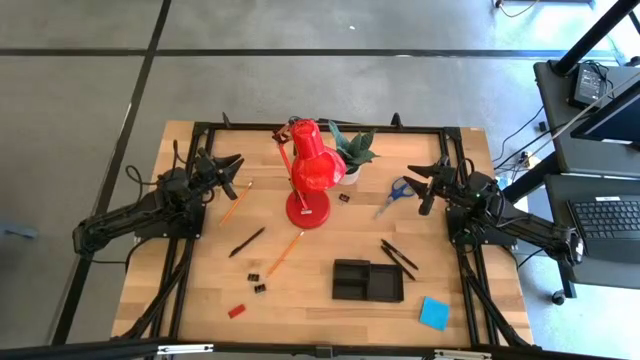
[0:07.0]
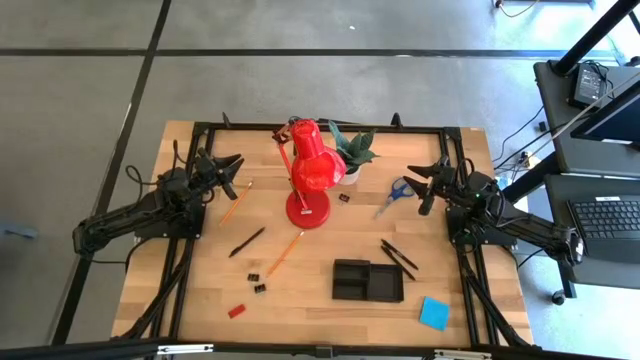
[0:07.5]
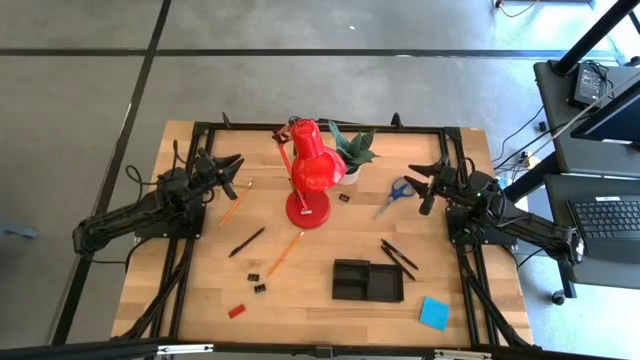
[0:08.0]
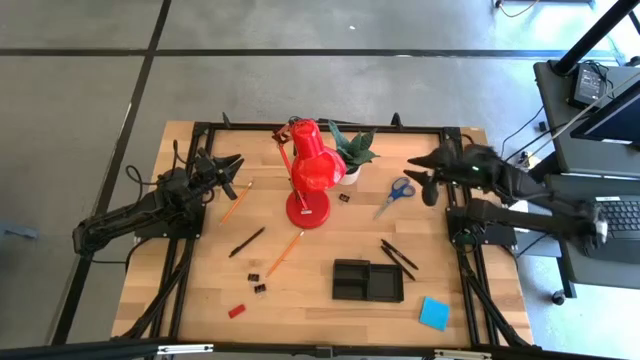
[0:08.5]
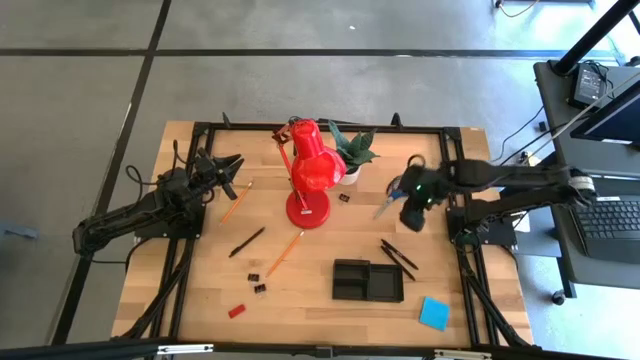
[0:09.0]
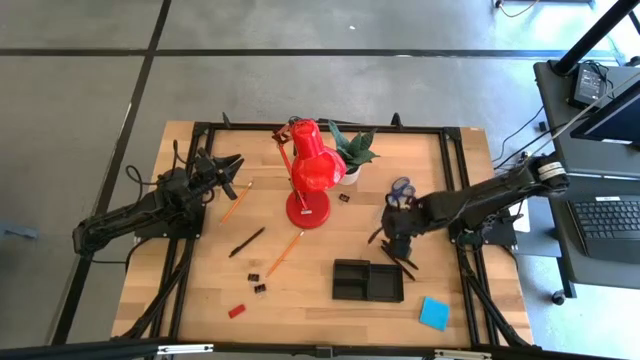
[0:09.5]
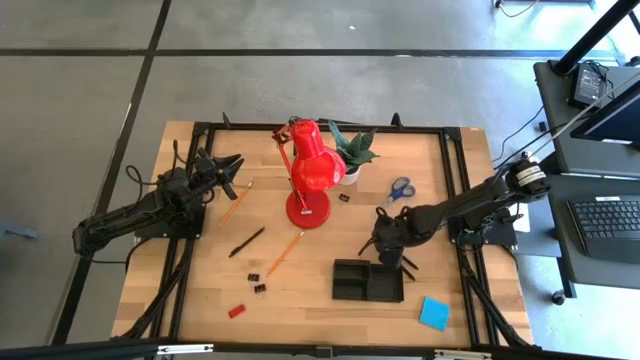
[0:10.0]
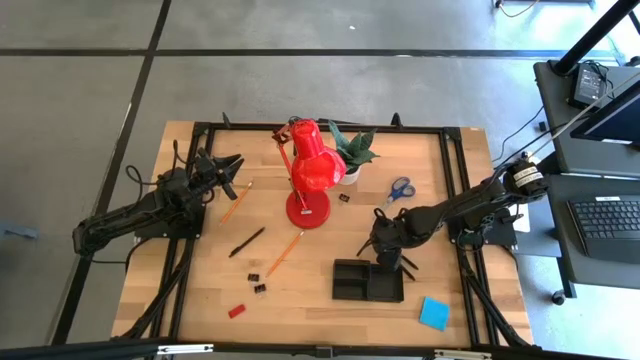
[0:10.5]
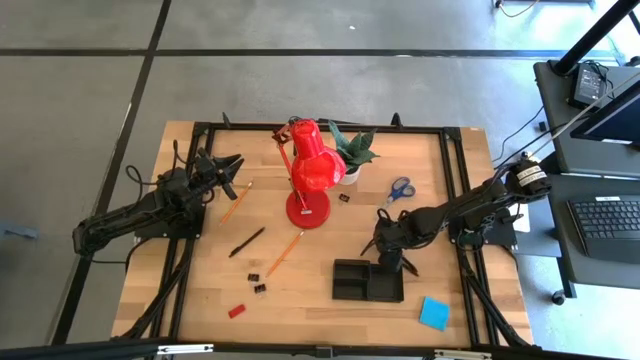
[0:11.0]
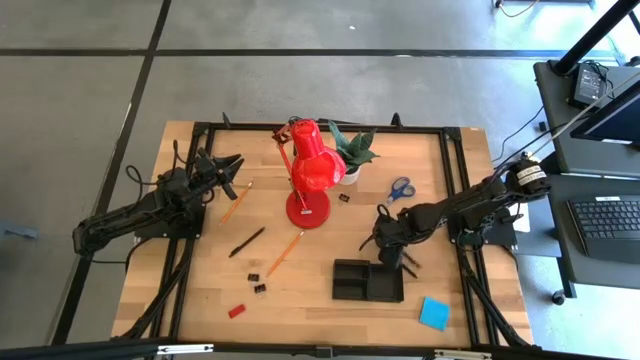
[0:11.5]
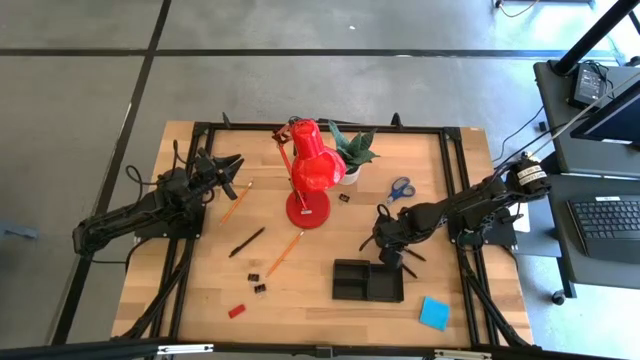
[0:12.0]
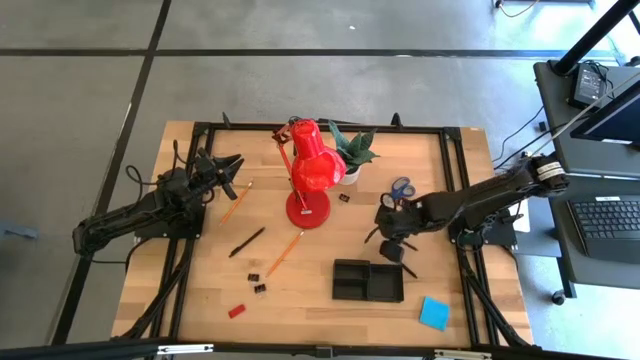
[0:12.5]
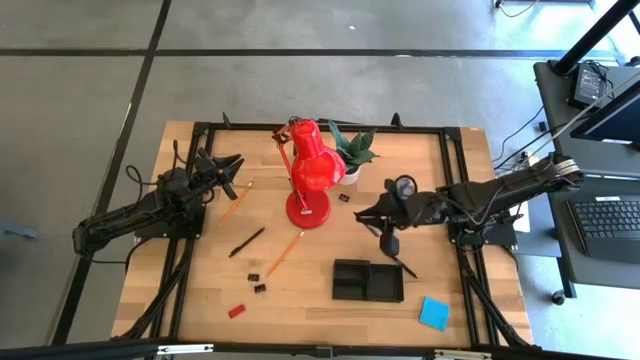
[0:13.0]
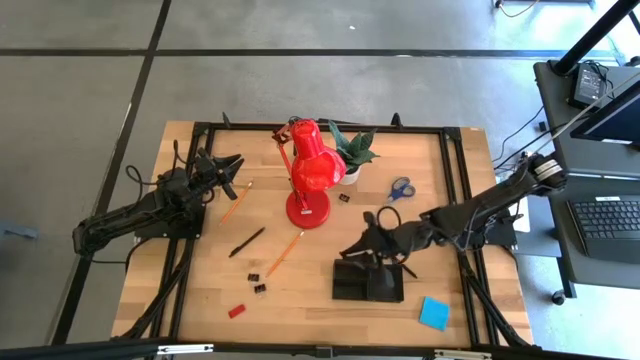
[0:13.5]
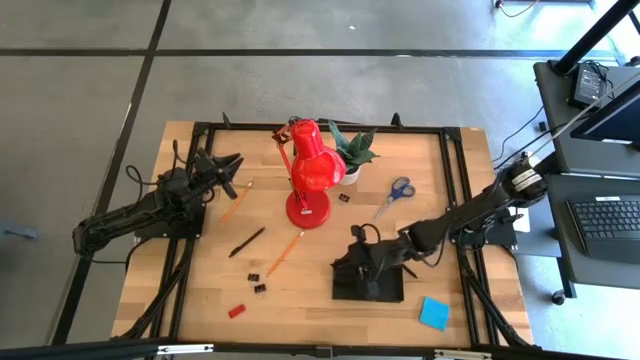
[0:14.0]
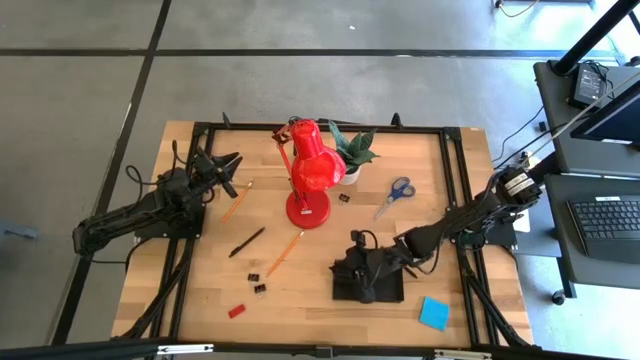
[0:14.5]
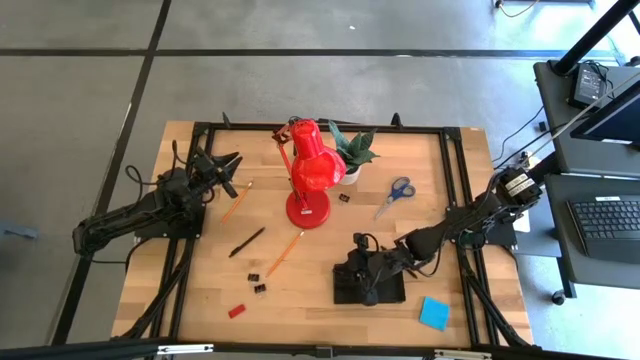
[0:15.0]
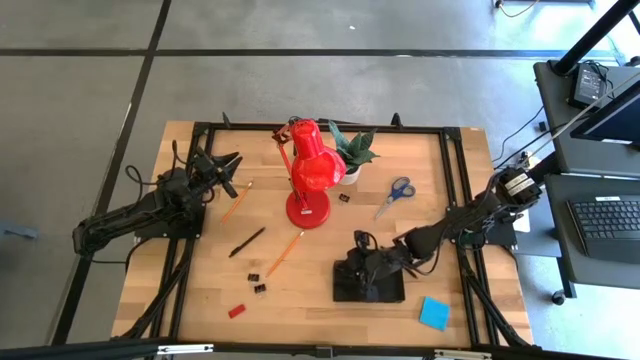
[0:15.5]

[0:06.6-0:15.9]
Task: Pick and place office supplies into organizer
Put the right black pen into the black desk organizer

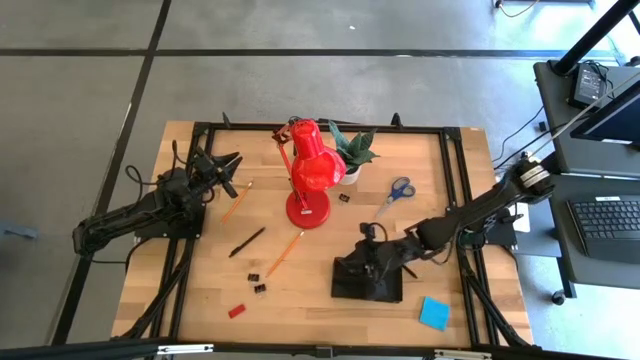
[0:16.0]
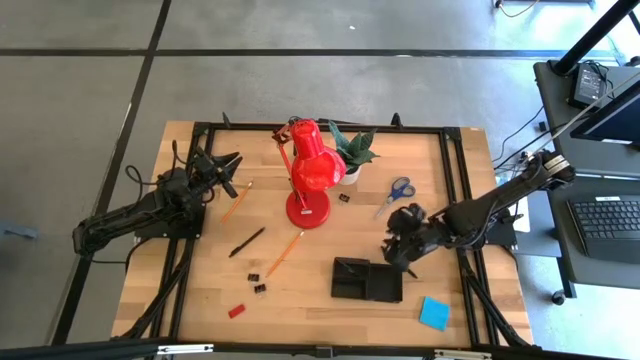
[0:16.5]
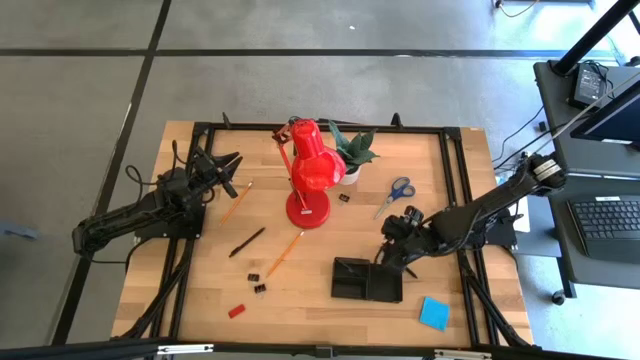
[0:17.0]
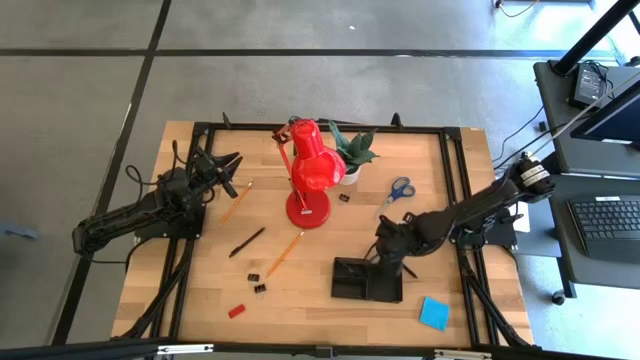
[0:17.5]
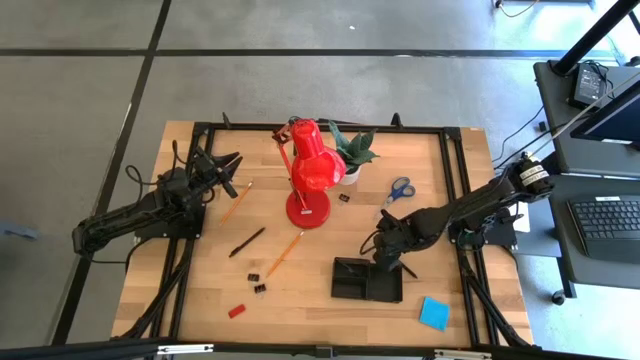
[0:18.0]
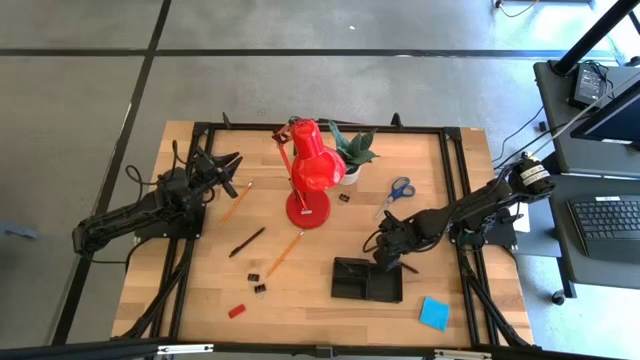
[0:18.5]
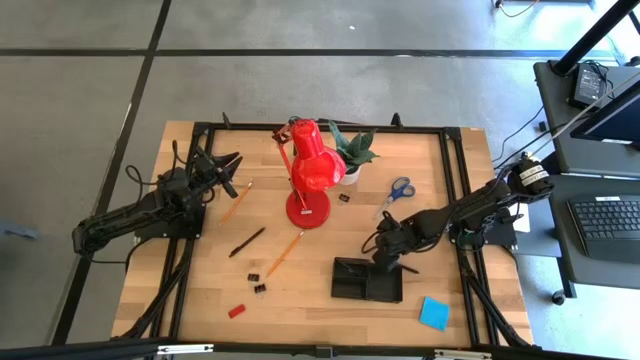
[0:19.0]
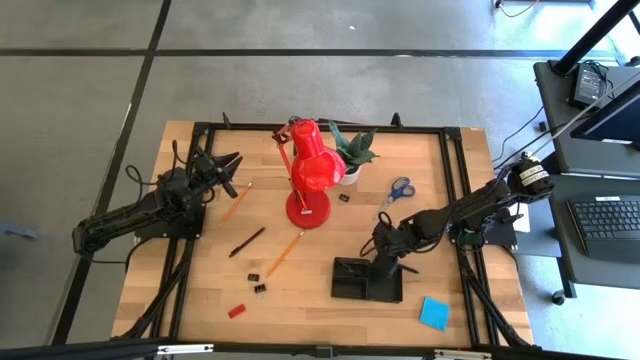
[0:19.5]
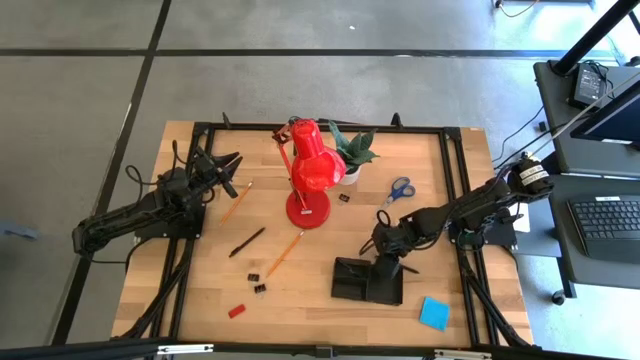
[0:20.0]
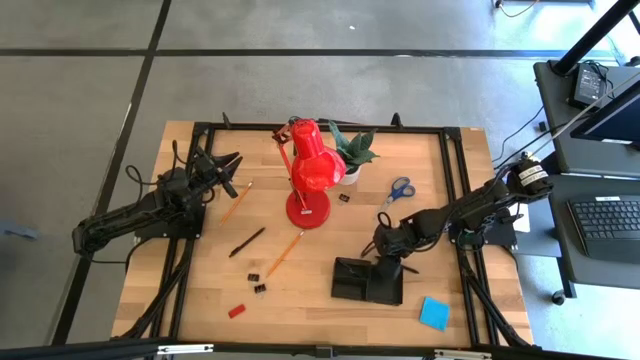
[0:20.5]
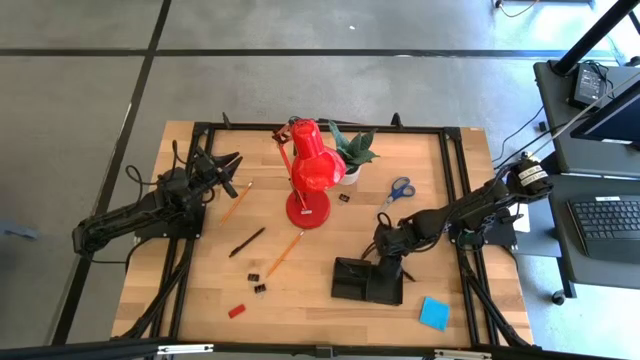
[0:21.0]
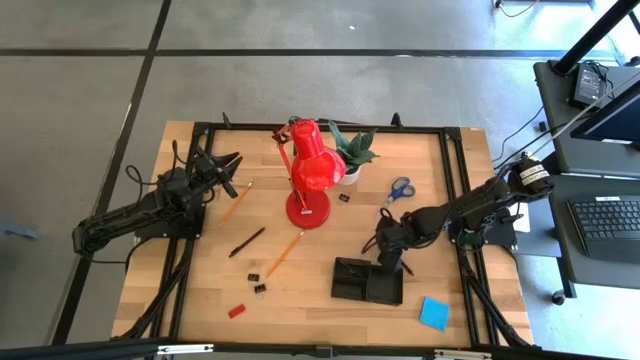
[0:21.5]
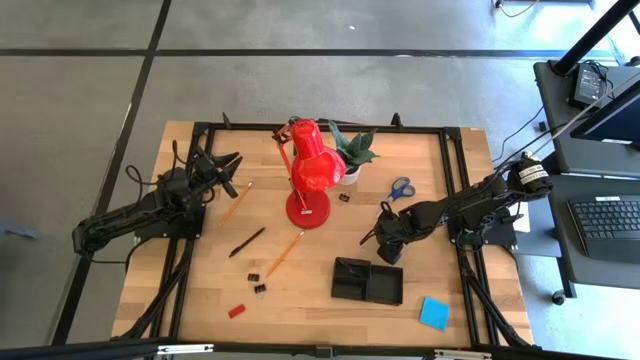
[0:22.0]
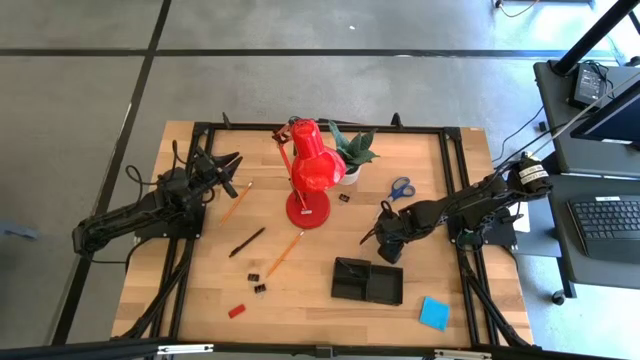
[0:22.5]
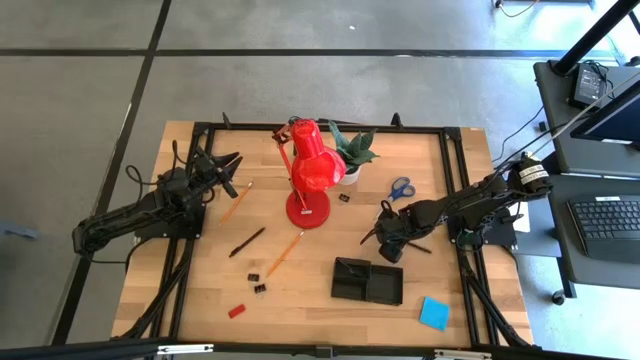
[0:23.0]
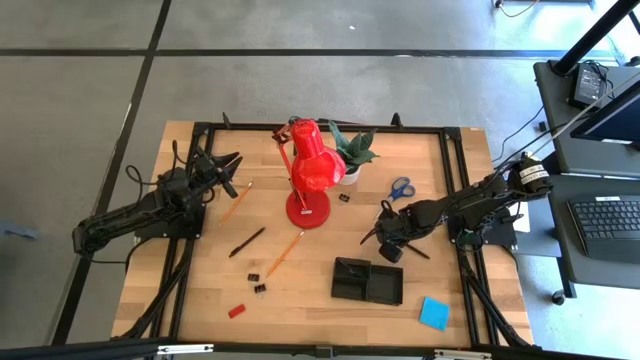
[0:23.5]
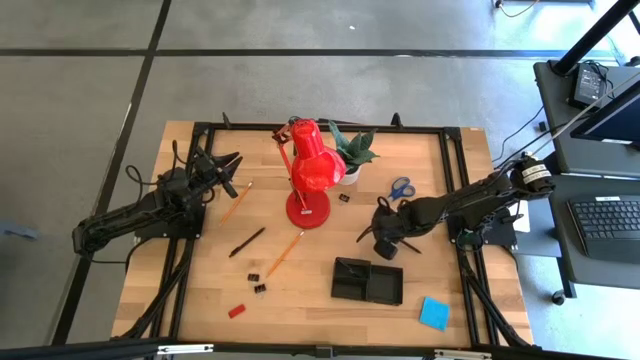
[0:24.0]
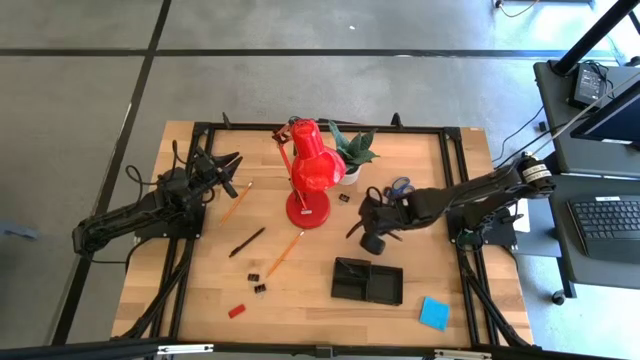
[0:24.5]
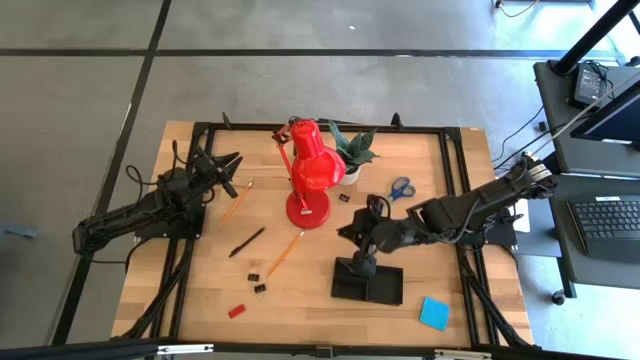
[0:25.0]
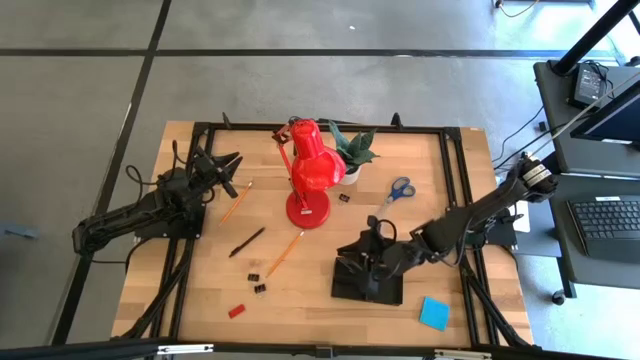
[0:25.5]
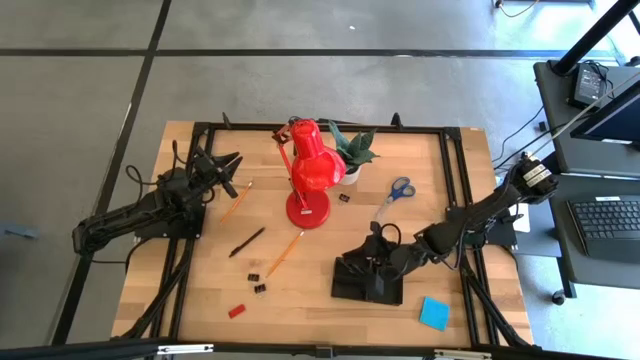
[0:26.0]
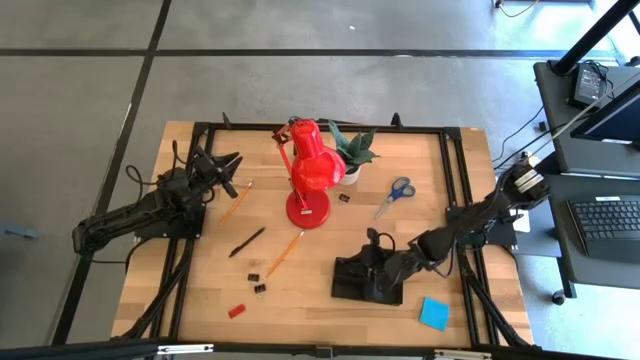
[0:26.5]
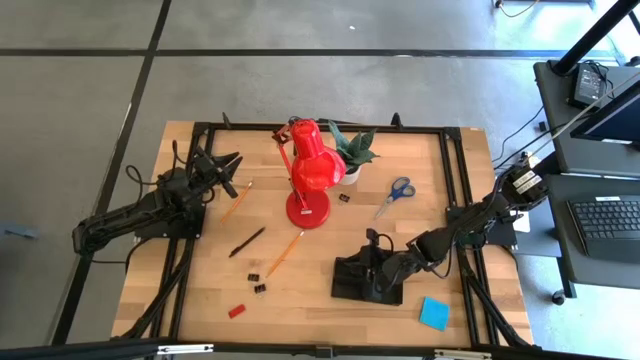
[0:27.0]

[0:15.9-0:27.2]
Put the right black pen into the black desk organizer

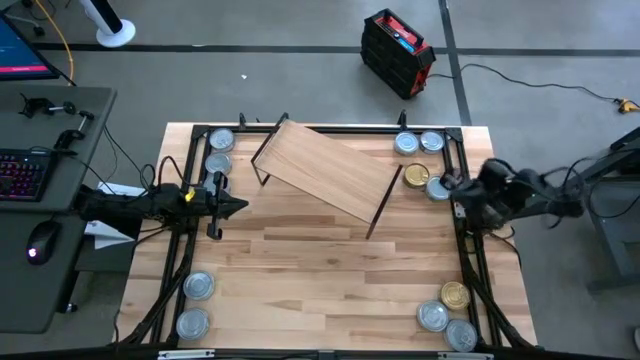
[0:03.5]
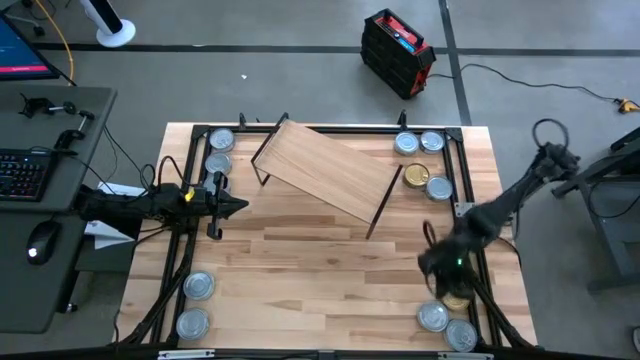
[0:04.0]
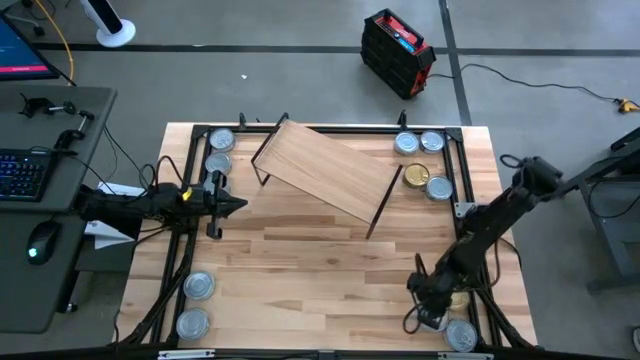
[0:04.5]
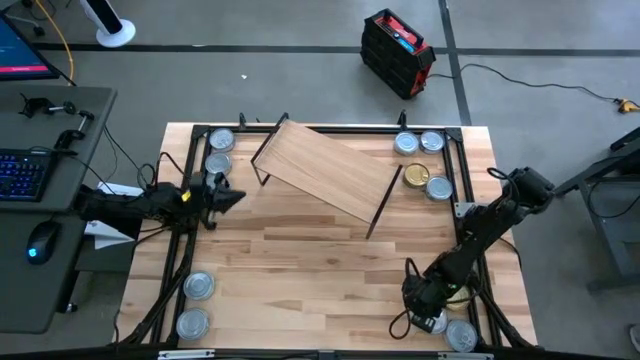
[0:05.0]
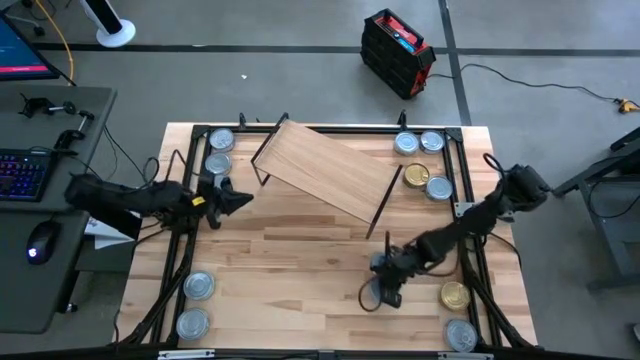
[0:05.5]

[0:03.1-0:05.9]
Task: Stack canned seafood by type on shelf
Move the white-green tuna can to the center of the table
